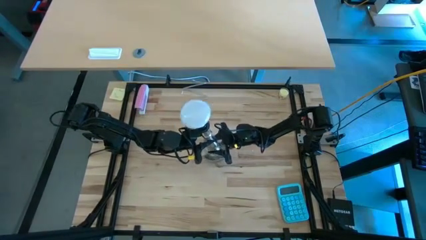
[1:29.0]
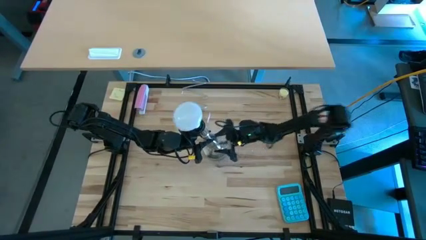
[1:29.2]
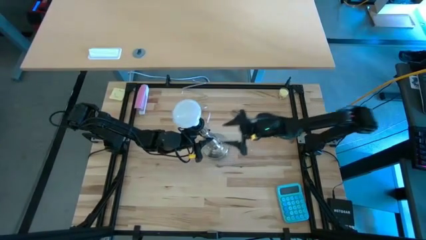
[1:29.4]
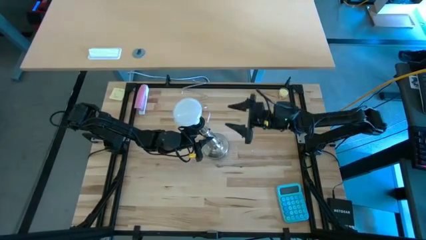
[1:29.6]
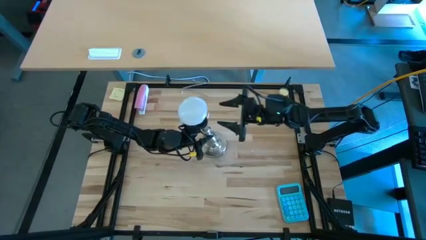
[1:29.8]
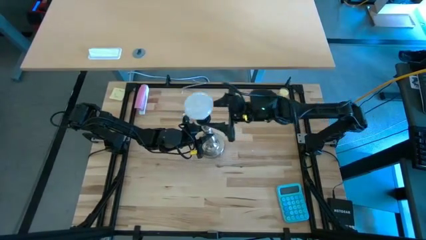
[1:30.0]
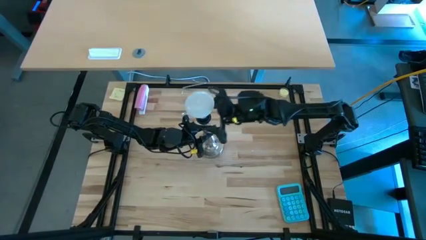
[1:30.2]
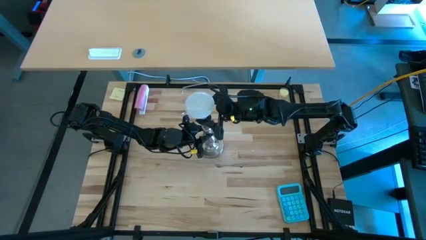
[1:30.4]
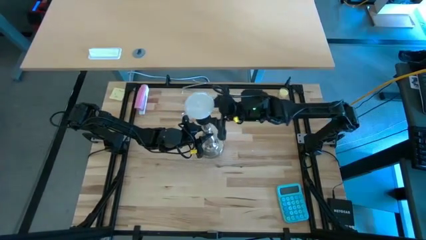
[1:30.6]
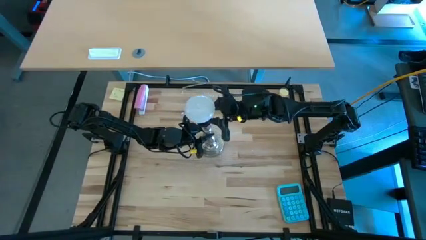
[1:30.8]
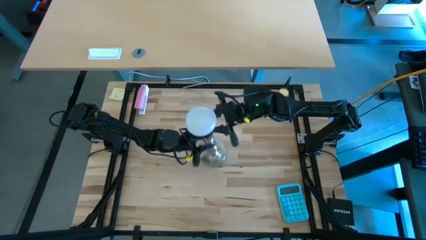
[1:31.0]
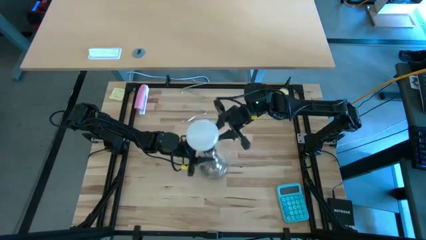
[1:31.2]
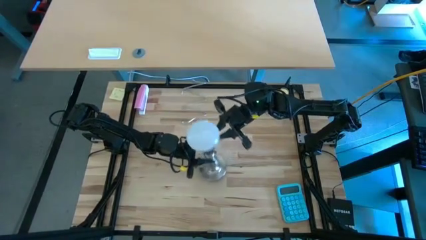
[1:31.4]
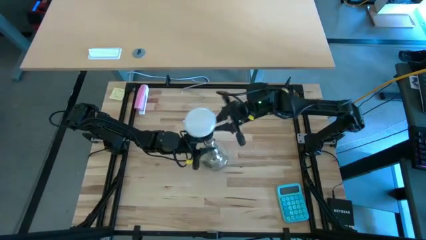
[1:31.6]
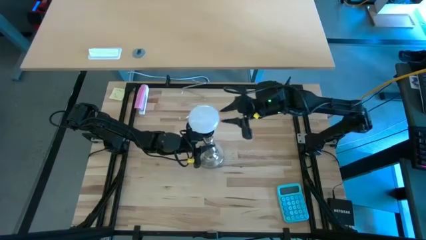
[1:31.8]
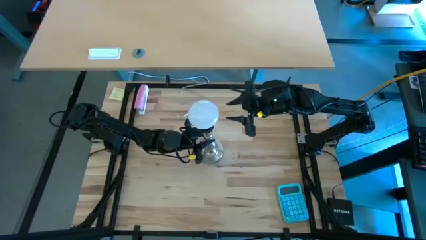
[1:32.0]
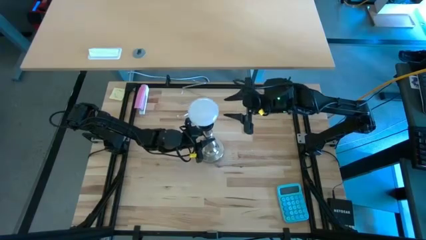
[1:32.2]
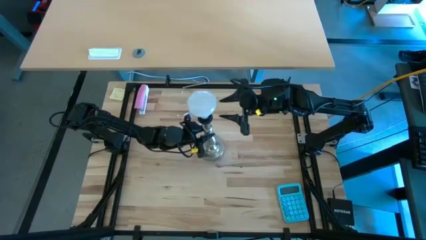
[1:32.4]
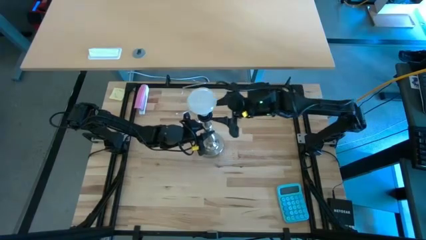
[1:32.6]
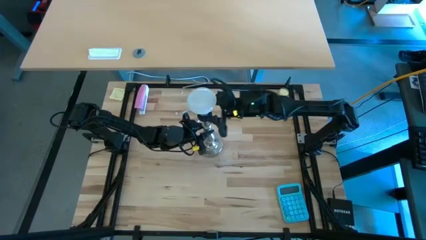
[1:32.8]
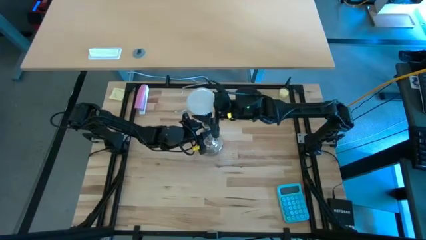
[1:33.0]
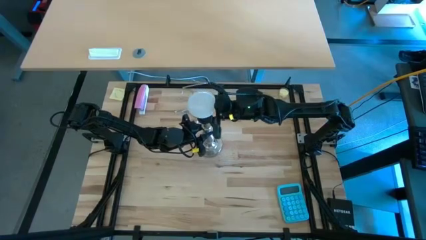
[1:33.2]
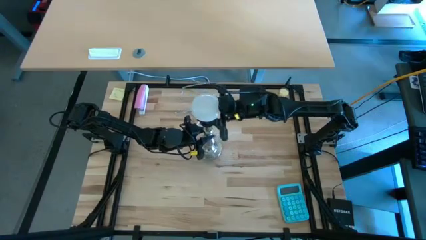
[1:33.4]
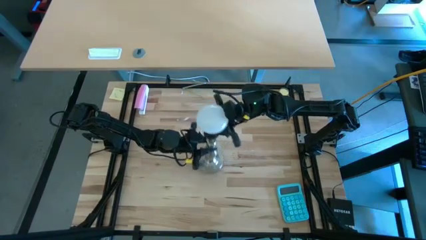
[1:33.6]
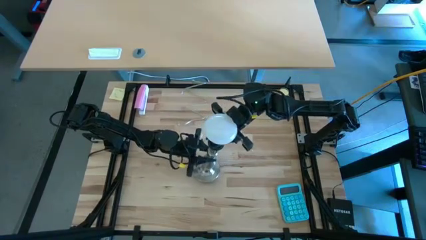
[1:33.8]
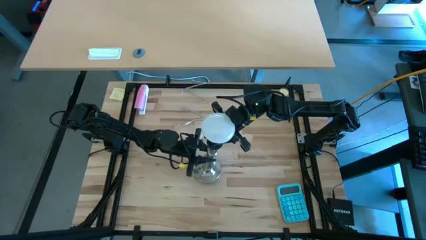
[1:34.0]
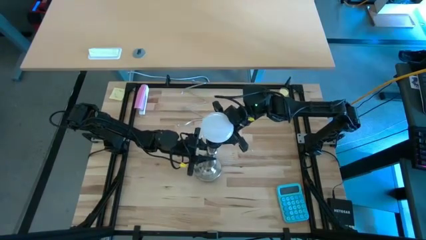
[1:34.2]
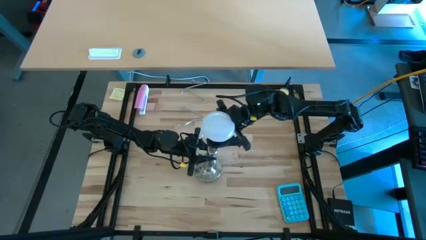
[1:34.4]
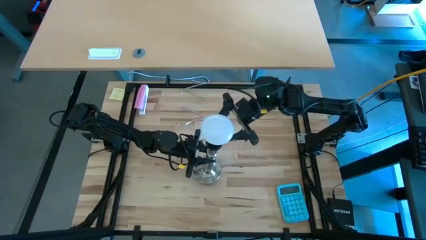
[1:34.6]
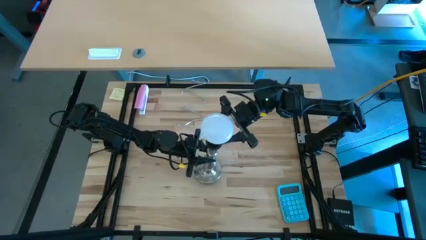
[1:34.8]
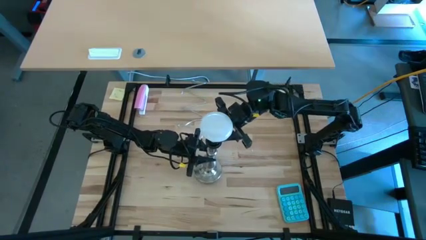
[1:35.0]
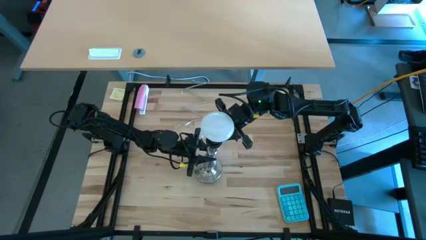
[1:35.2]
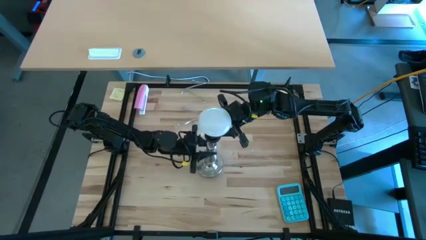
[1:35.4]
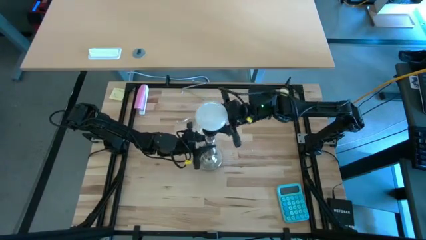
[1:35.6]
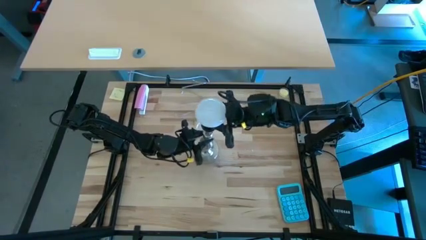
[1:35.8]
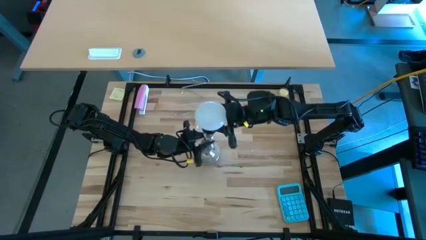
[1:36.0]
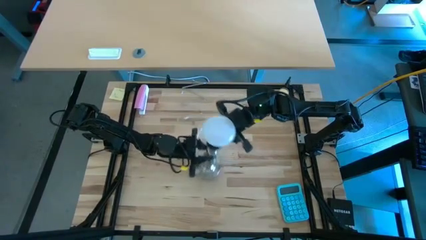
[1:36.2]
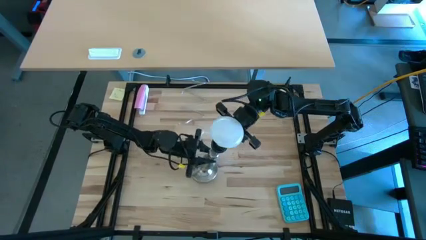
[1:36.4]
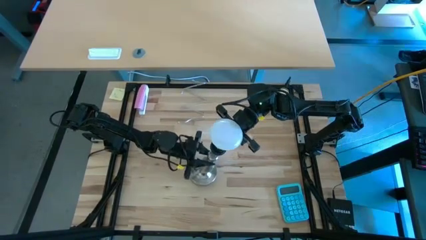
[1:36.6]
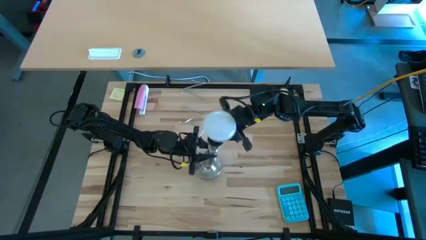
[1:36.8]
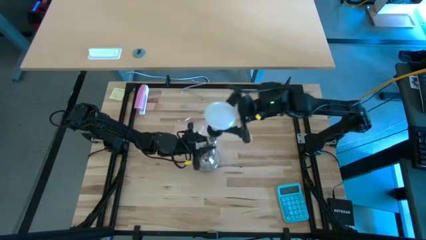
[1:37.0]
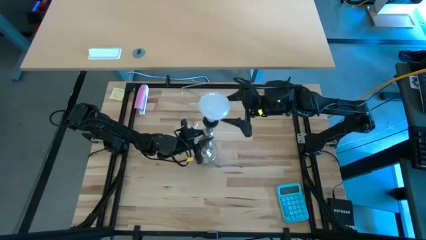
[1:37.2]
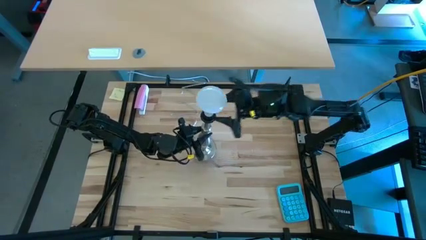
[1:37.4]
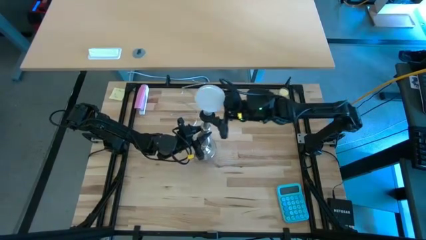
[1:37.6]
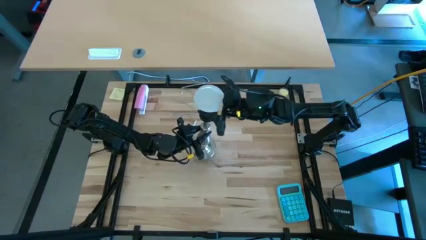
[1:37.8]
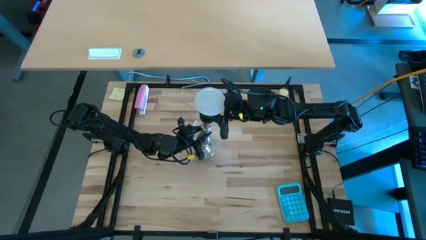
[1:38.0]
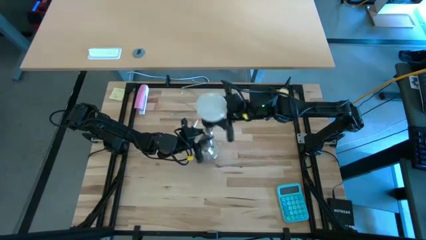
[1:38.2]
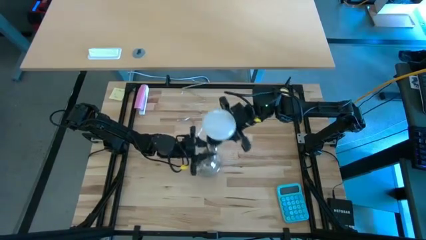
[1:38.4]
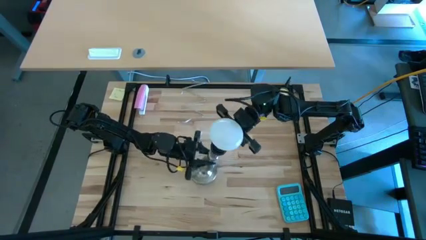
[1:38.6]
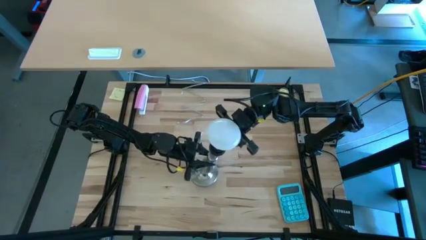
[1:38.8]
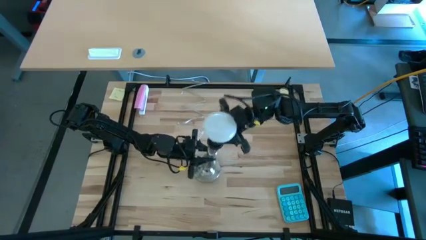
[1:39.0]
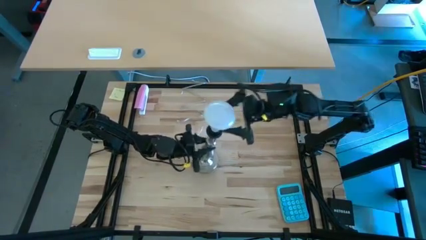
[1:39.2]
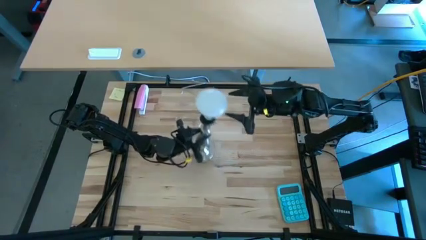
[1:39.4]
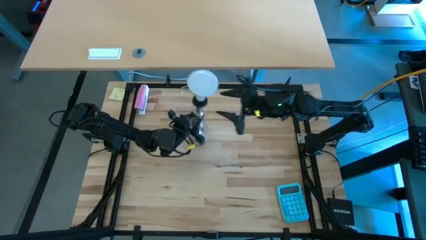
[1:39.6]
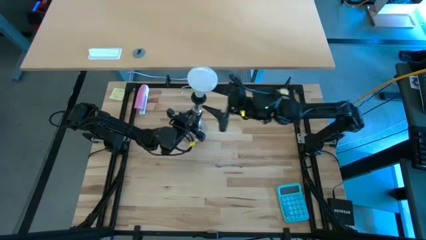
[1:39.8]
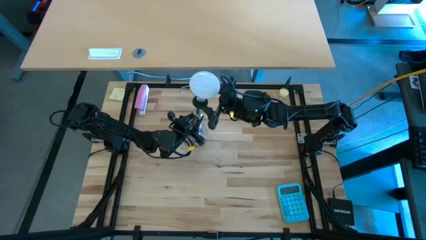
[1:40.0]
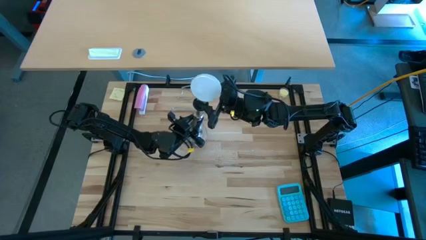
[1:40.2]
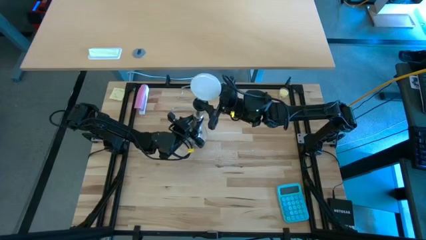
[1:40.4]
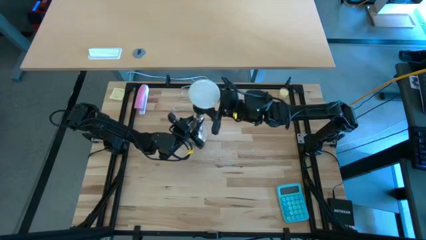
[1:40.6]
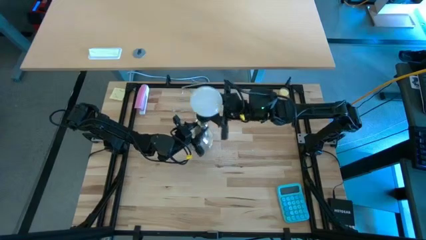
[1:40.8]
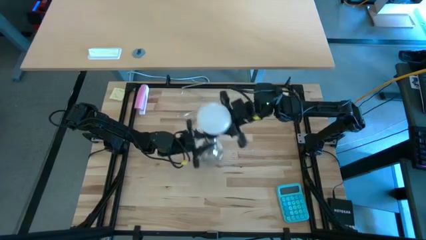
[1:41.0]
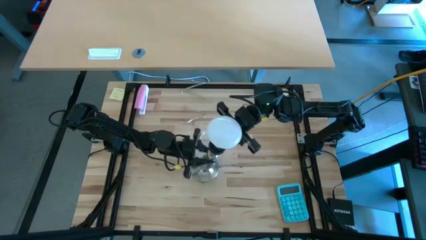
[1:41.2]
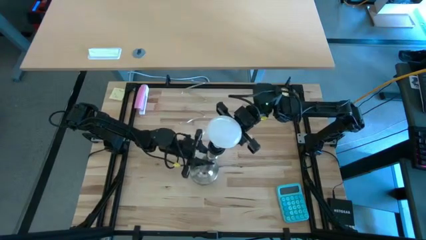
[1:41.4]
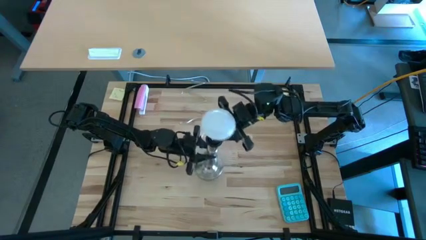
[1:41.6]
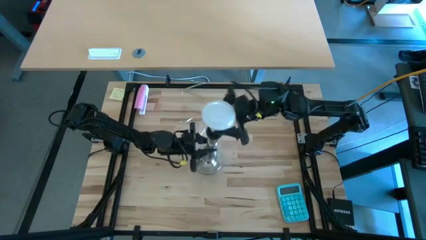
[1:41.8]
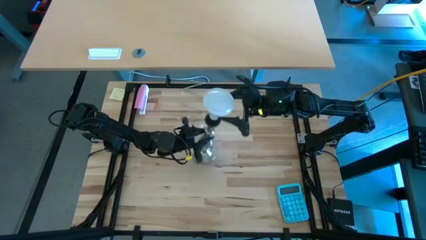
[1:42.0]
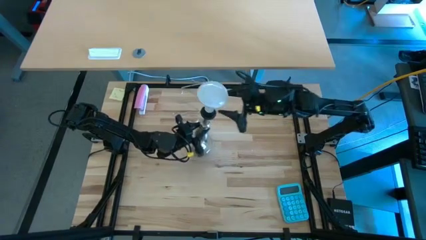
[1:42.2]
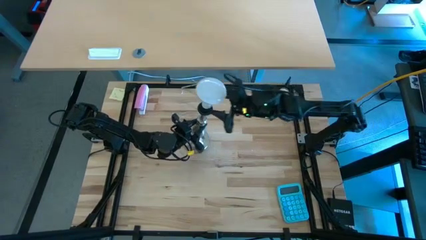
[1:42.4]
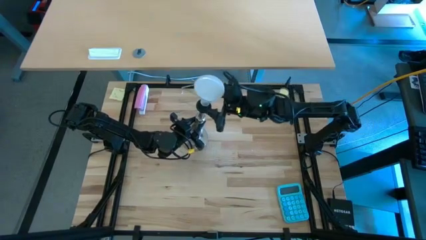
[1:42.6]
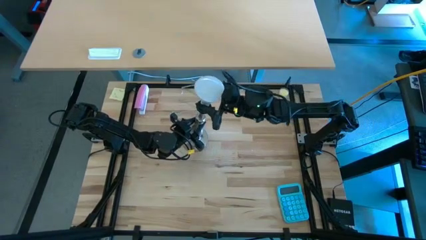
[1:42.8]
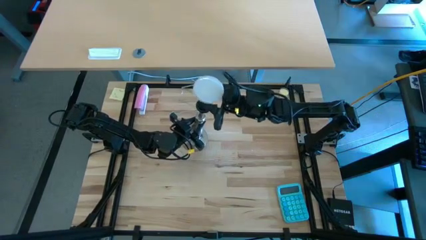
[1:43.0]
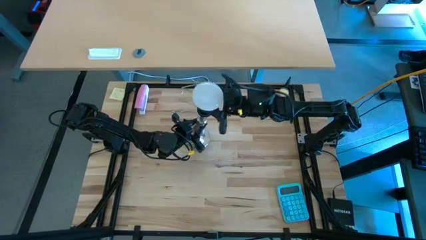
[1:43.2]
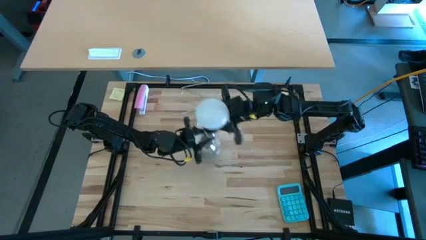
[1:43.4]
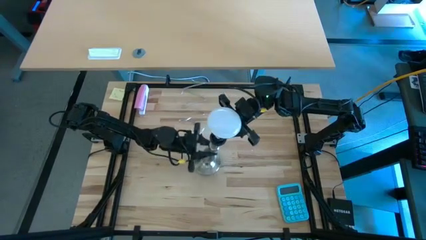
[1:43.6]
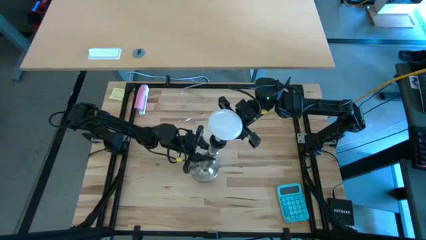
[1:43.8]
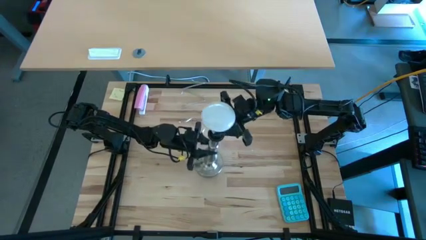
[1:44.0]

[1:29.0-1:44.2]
Task: Screw lightbulb
Remove the lightbulb from the desk lamp
